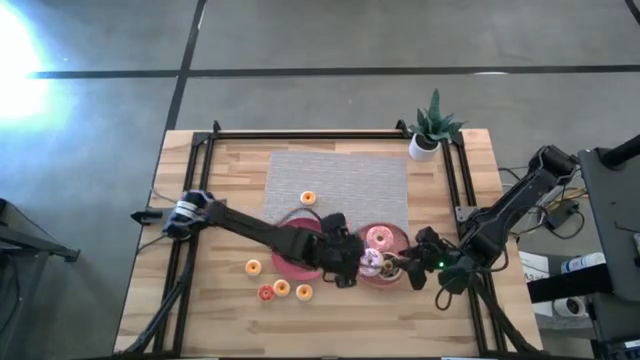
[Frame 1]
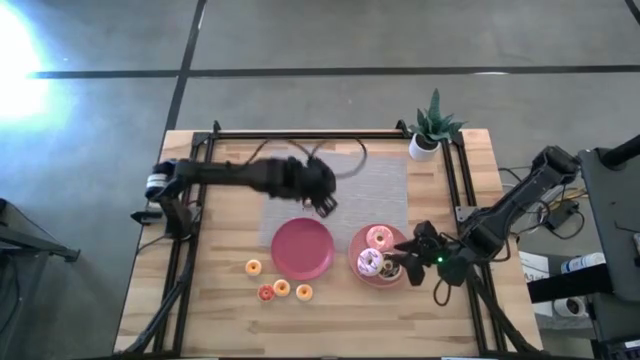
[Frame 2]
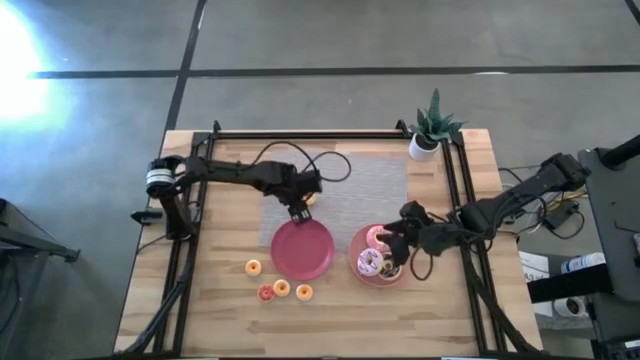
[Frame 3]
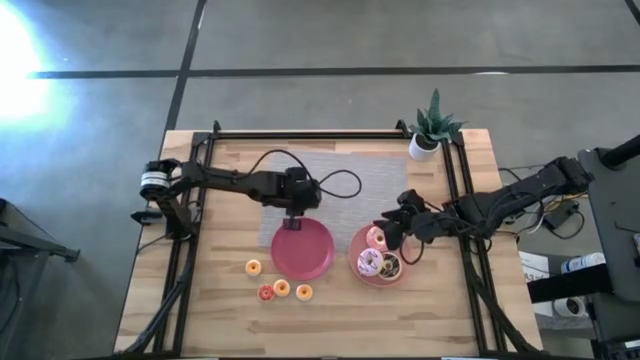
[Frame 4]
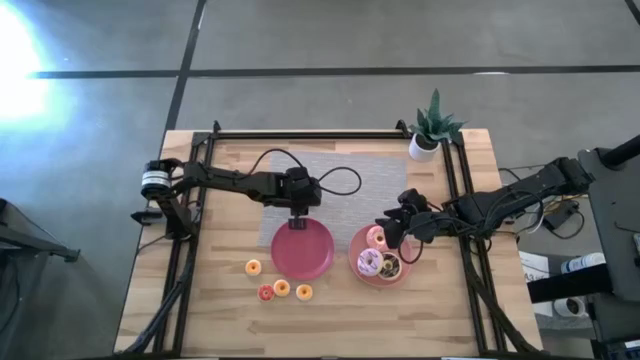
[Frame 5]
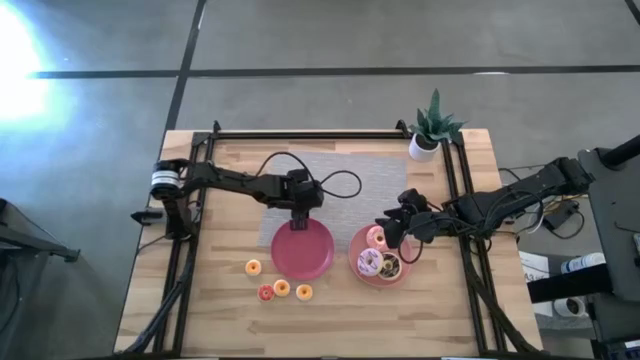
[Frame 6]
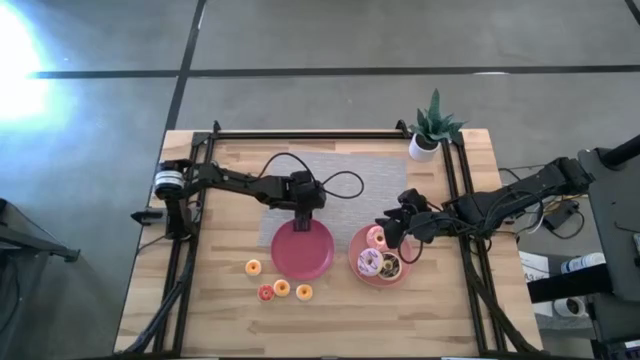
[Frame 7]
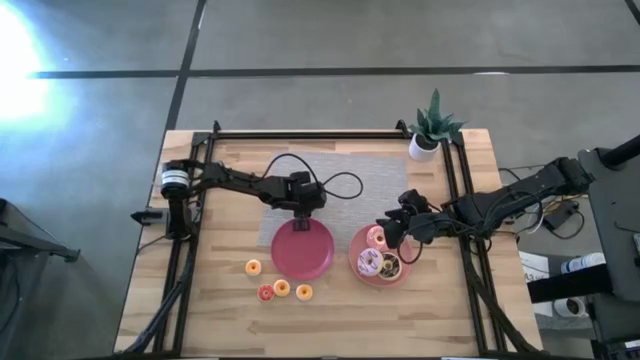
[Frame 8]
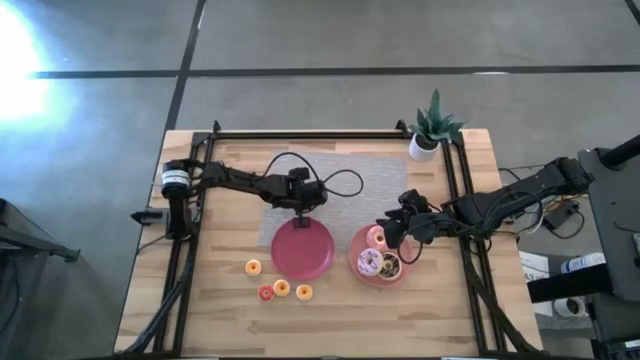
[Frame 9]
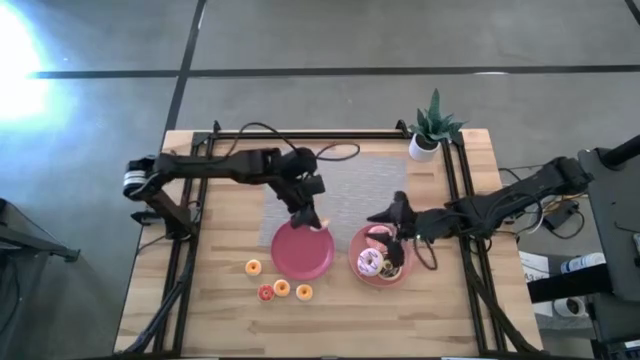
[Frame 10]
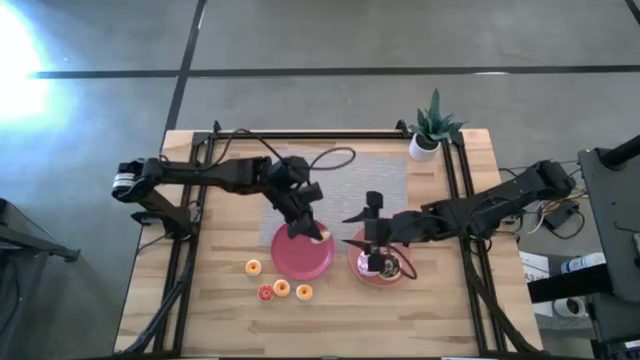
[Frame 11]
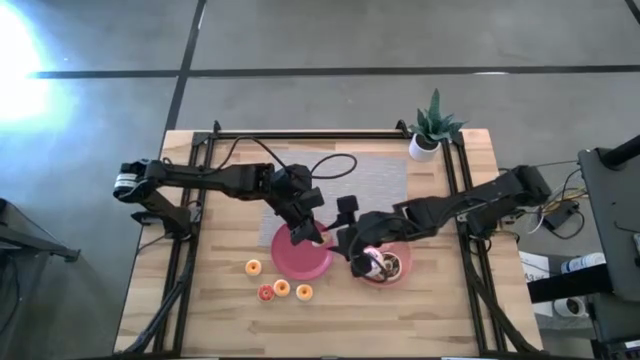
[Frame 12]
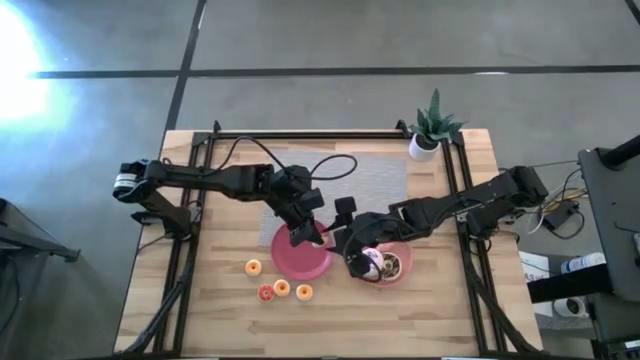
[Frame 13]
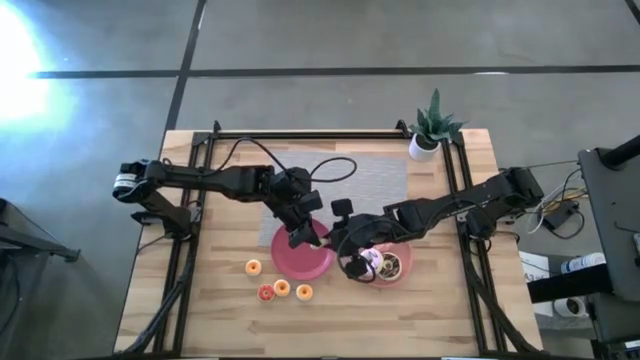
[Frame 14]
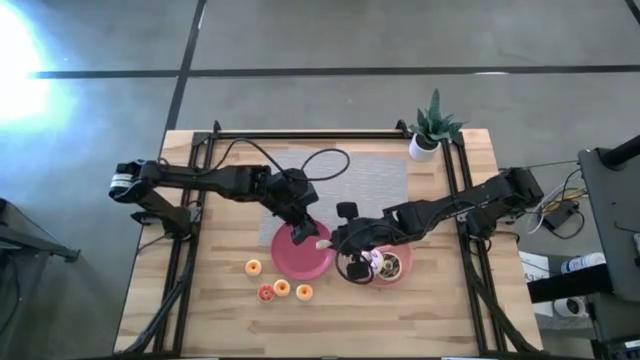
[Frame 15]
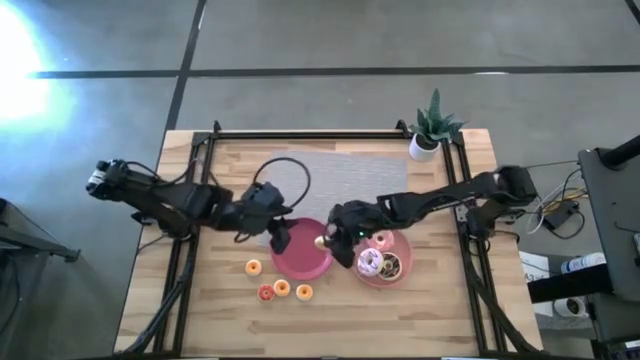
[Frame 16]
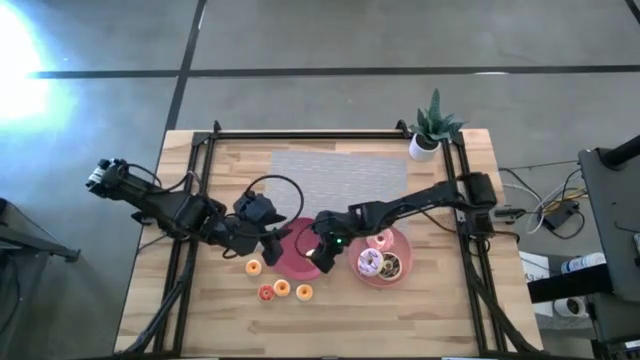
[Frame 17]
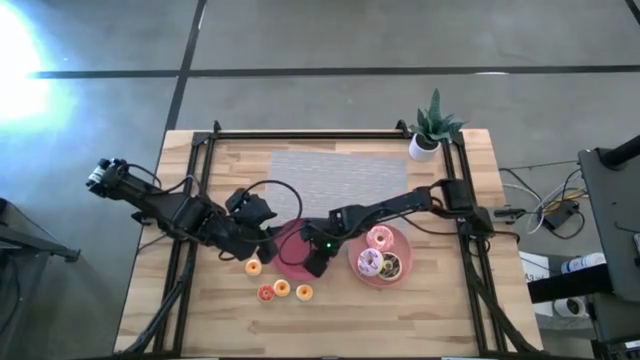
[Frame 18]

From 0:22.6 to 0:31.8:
Task: Pick & Place donuts
Put the small yellow donut on the pink plate

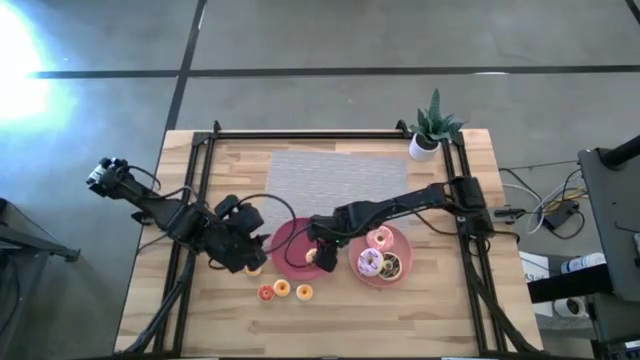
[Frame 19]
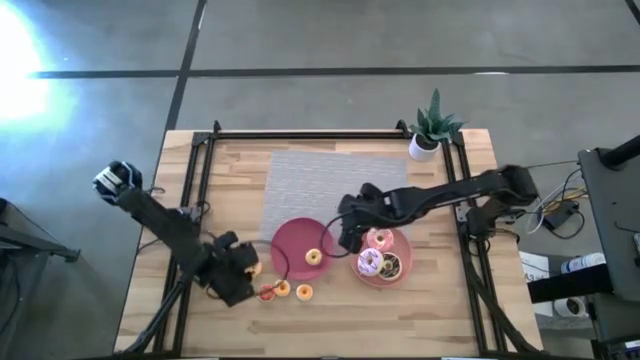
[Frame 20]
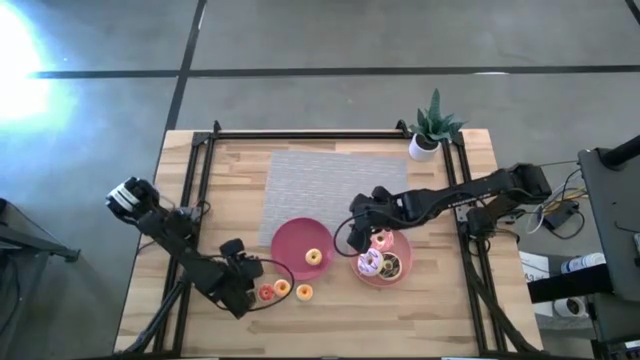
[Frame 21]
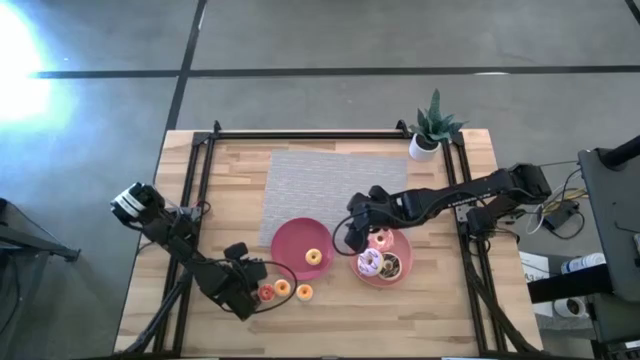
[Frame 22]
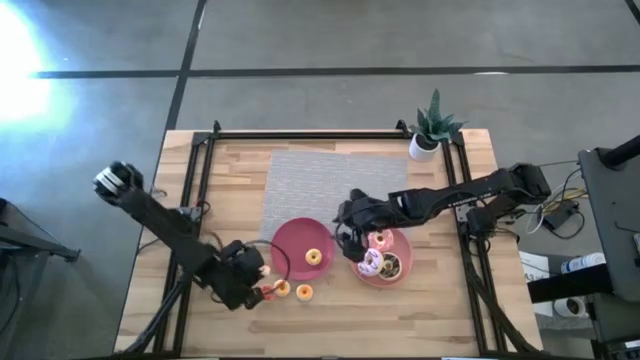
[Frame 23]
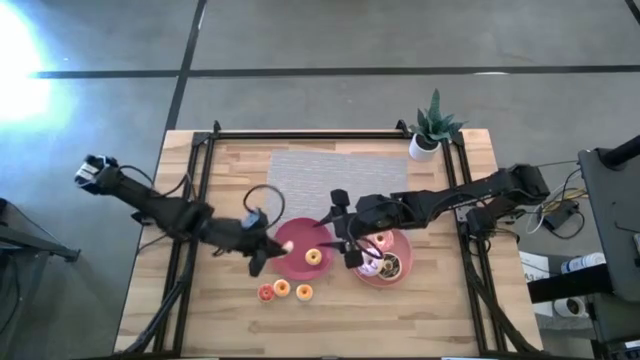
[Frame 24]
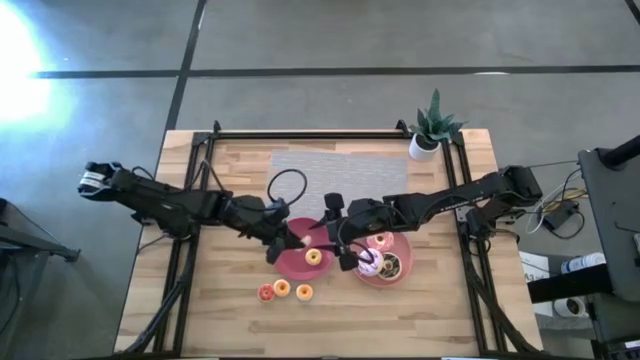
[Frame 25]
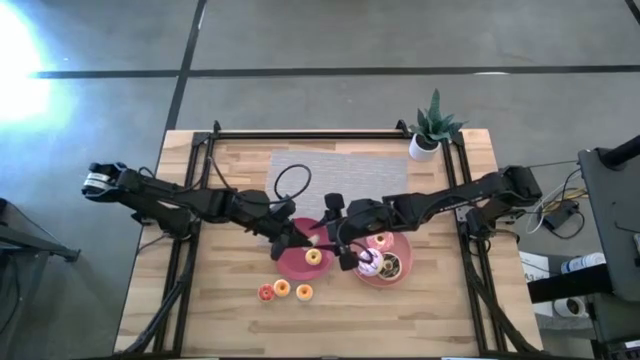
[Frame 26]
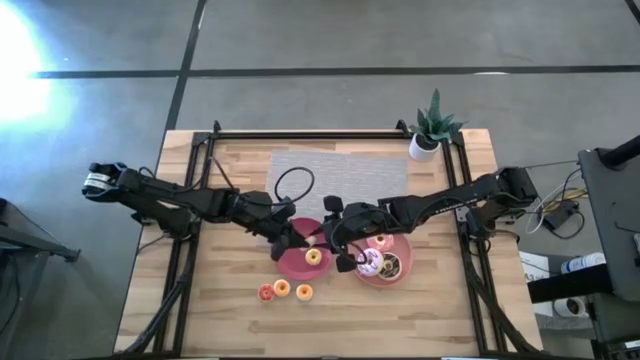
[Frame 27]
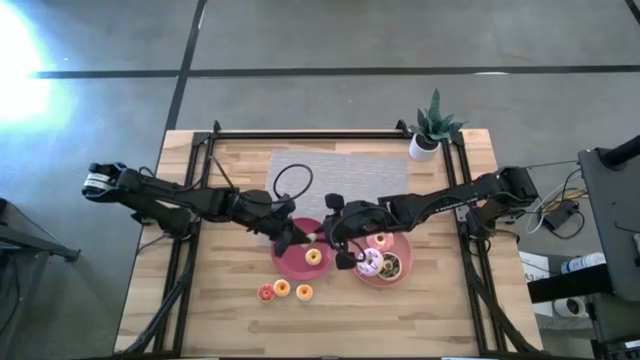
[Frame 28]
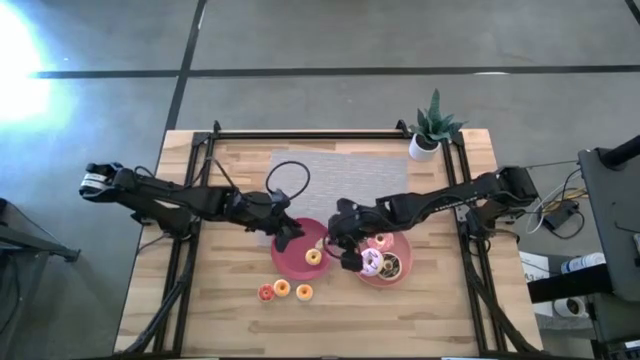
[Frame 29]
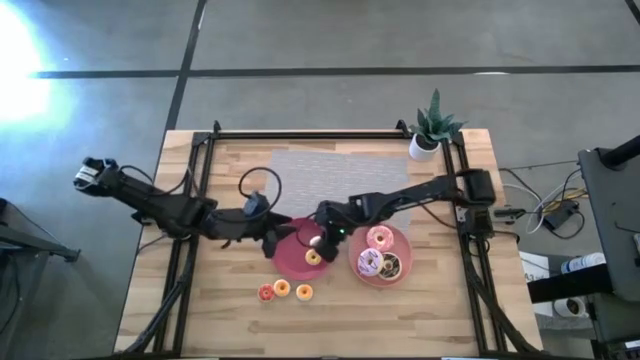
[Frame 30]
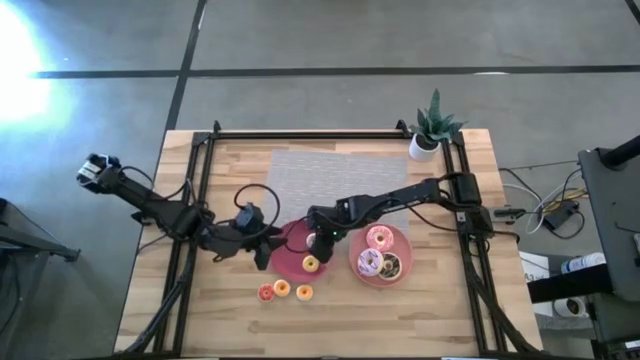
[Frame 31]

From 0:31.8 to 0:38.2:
Put the small white donut on the pink plate

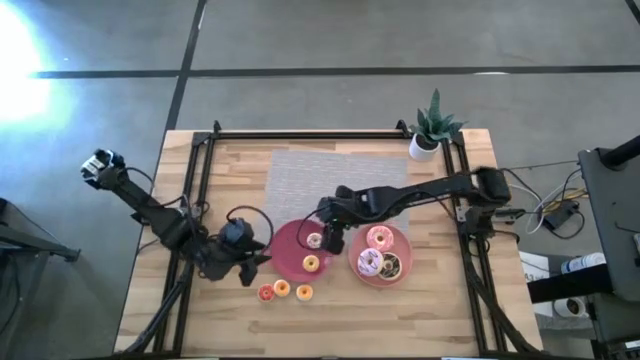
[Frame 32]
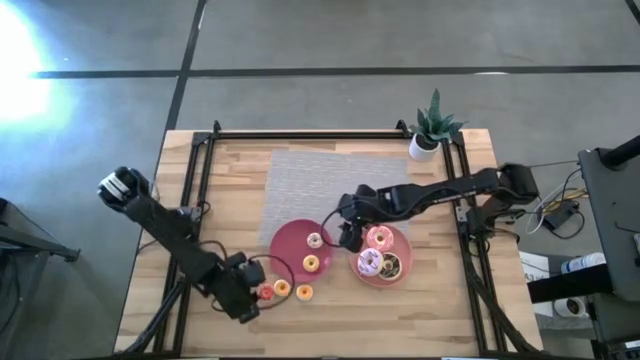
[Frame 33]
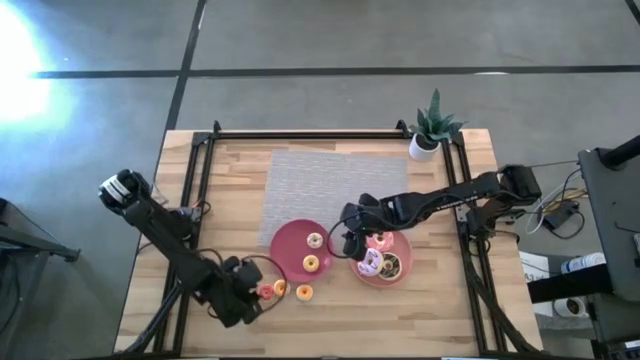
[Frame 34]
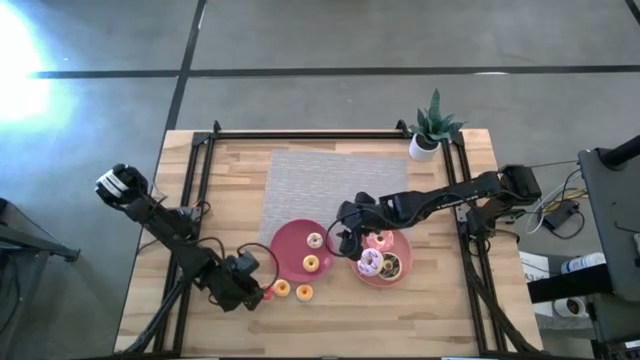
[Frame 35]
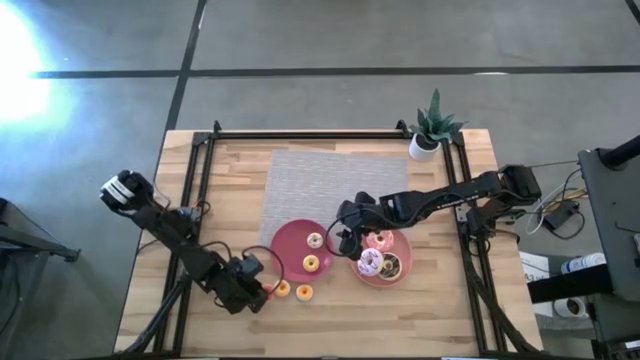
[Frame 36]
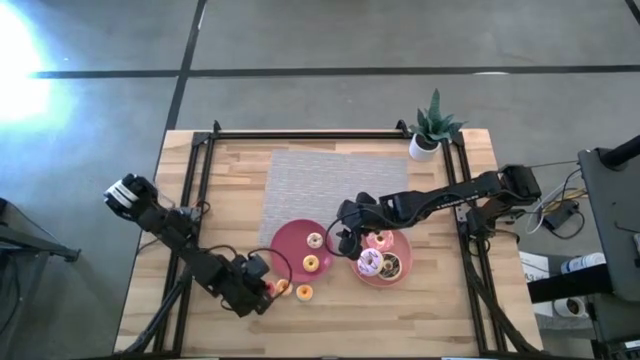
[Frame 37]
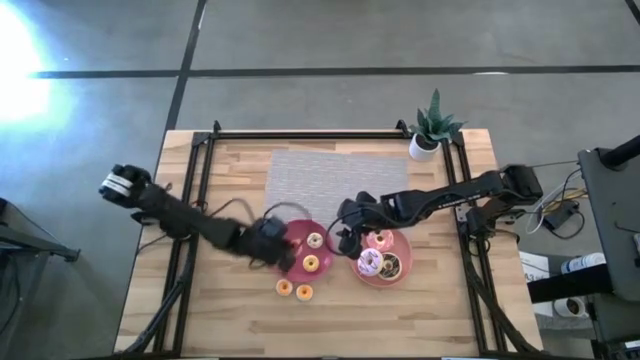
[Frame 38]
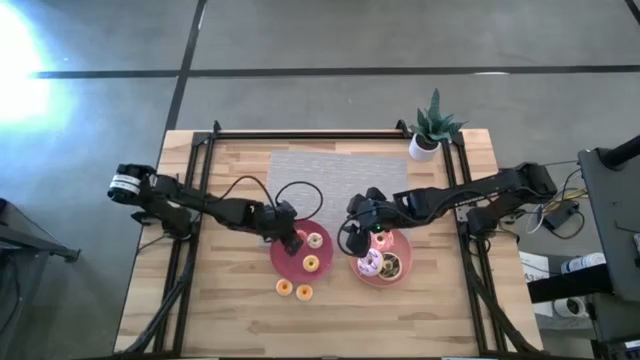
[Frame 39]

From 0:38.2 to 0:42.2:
Put the small pink donut on the pink plate

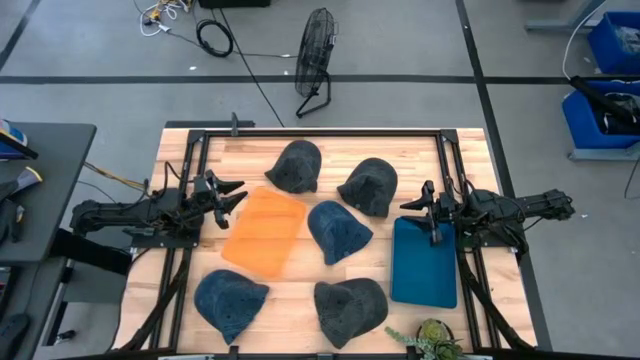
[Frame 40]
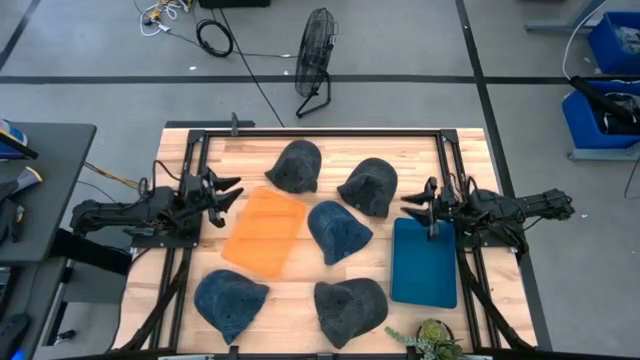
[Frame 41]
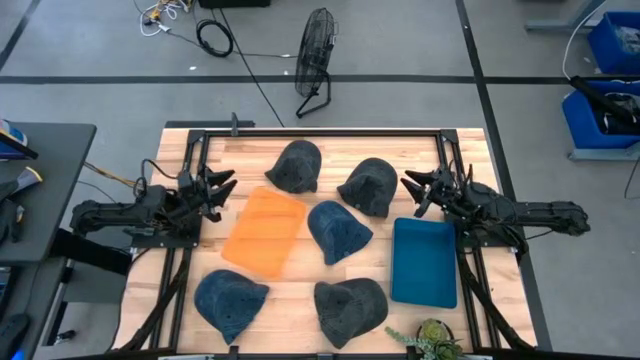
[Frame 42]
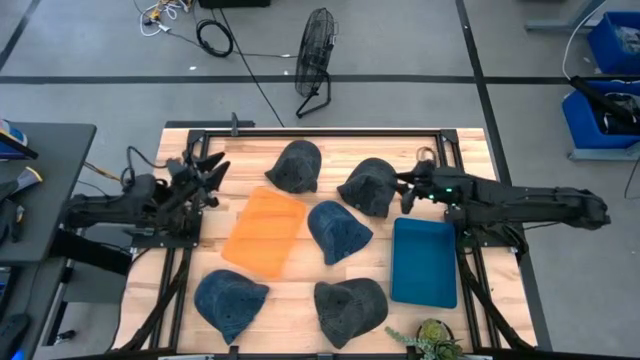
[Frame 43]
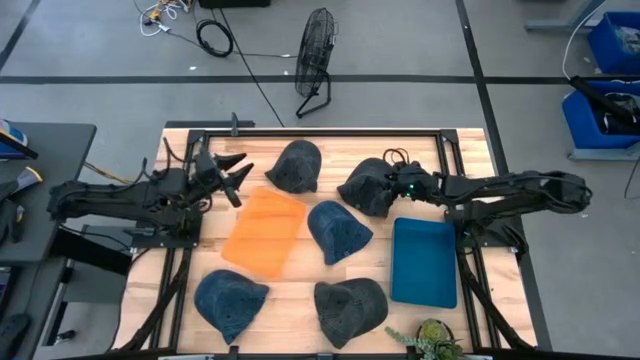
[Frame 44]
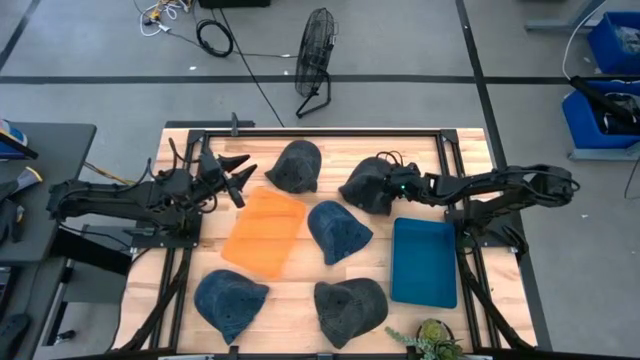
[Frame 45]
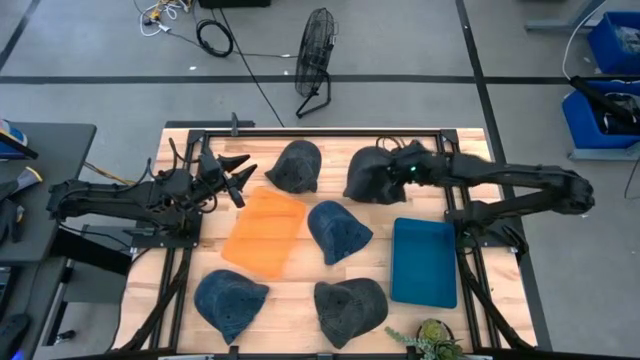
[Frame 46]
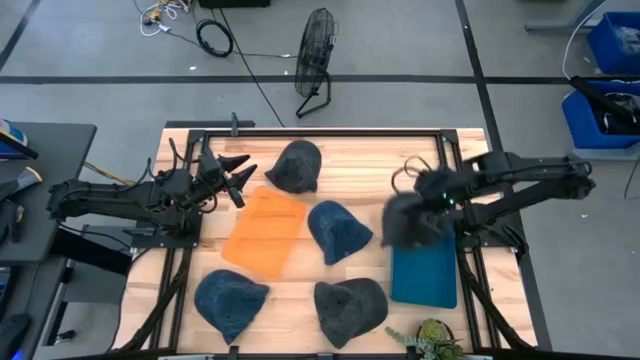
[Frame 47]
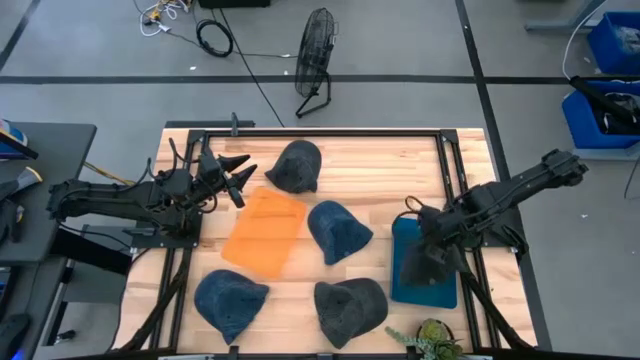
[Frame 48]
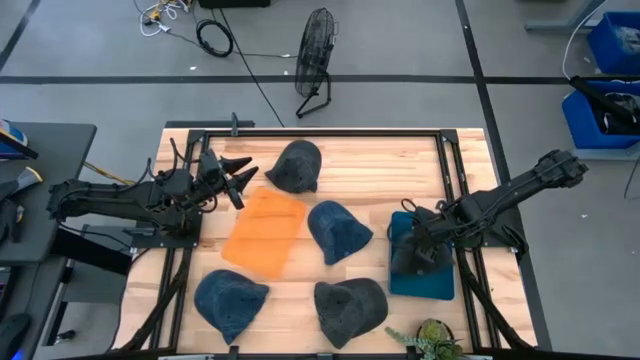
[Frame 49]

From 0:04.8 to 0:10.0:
Task: Pick & Place hat
Put the top right black cap into the blue bin
